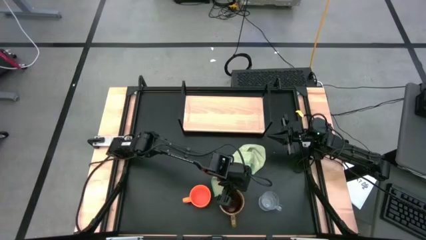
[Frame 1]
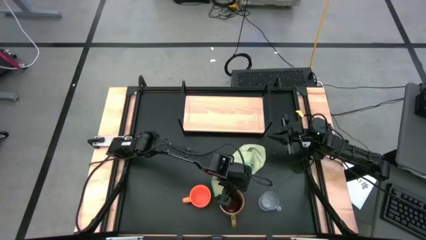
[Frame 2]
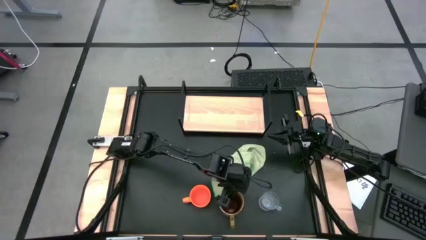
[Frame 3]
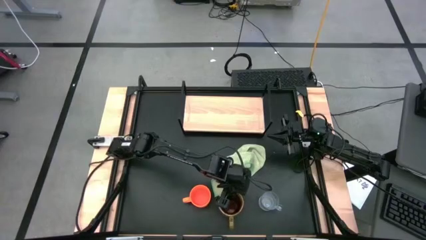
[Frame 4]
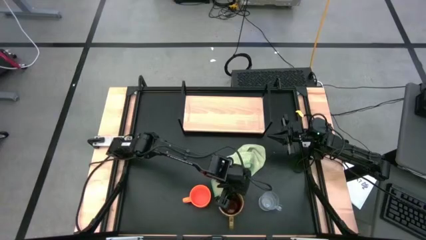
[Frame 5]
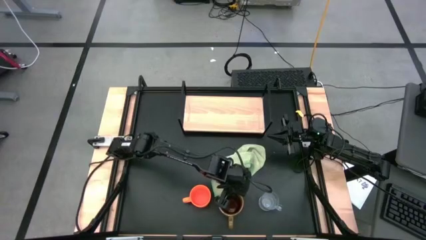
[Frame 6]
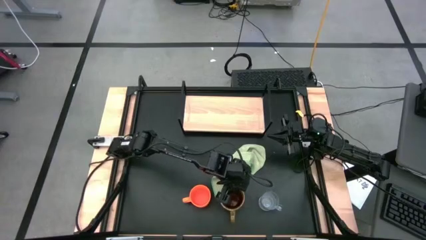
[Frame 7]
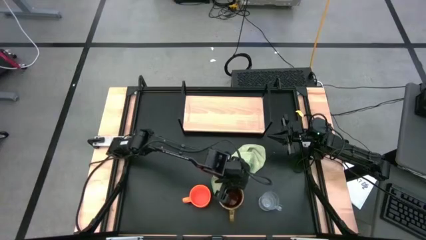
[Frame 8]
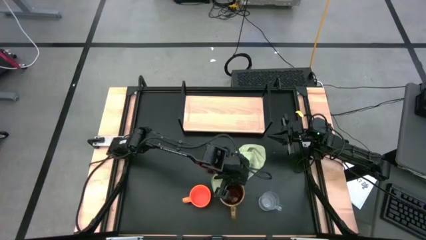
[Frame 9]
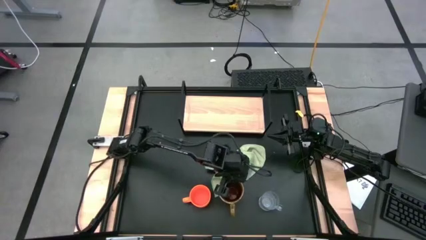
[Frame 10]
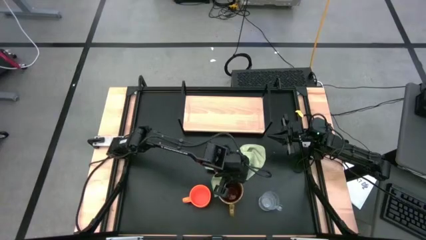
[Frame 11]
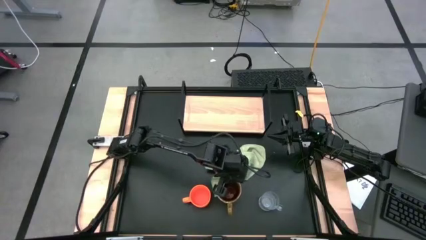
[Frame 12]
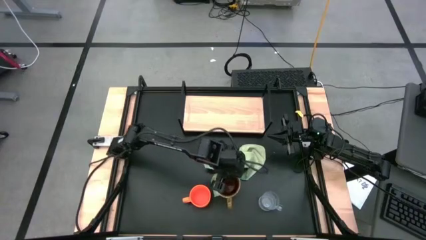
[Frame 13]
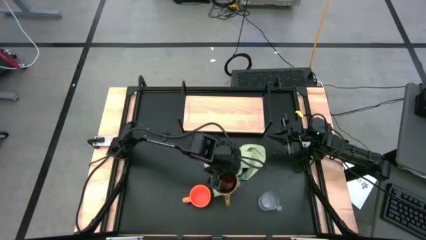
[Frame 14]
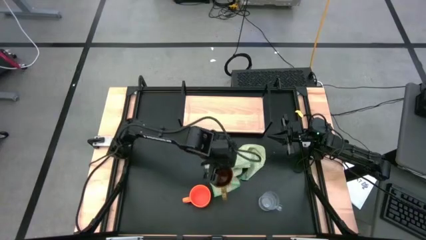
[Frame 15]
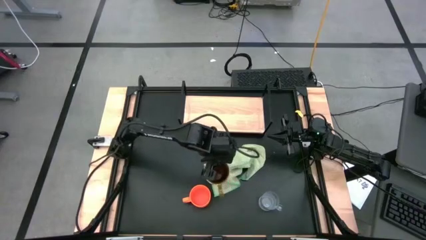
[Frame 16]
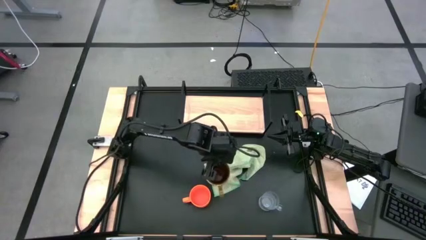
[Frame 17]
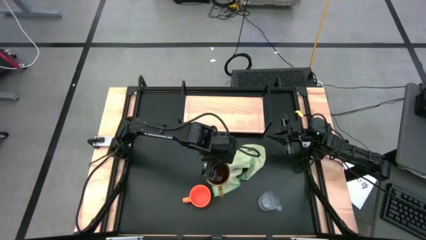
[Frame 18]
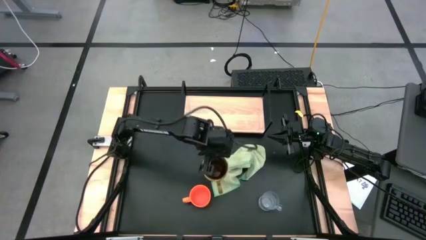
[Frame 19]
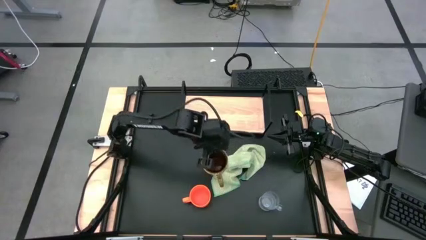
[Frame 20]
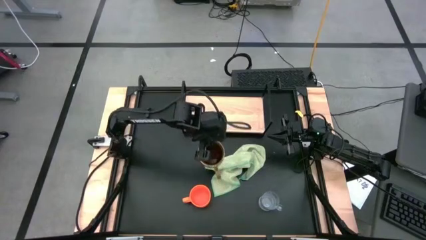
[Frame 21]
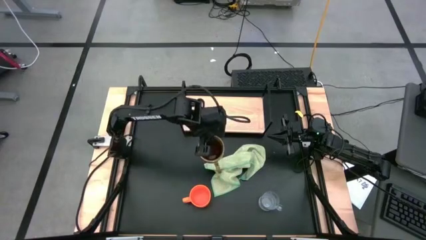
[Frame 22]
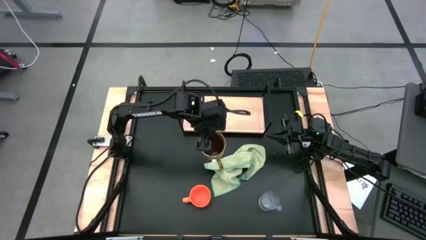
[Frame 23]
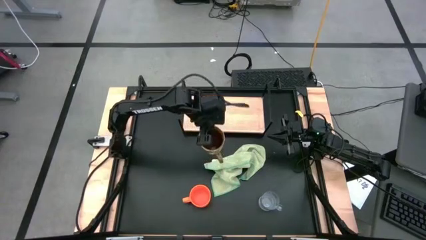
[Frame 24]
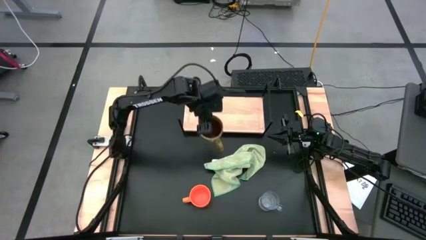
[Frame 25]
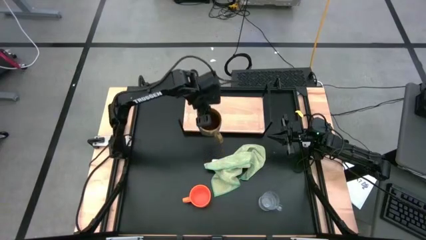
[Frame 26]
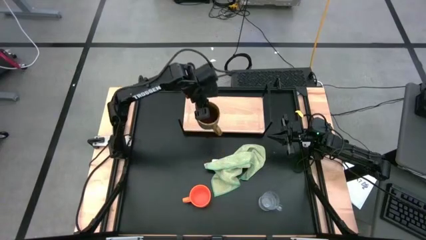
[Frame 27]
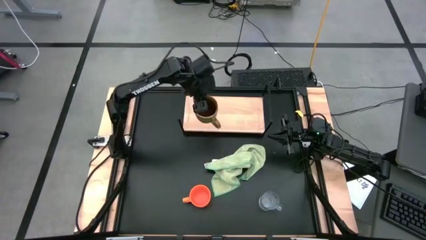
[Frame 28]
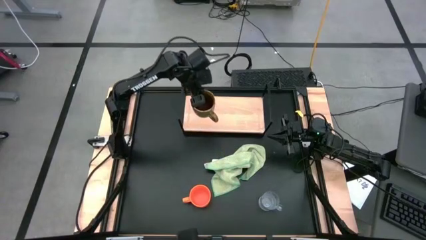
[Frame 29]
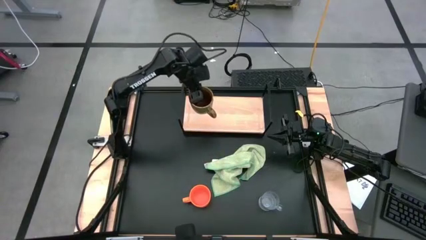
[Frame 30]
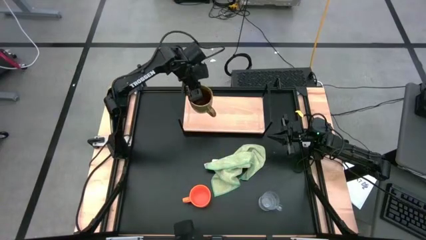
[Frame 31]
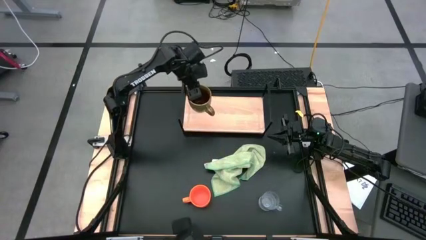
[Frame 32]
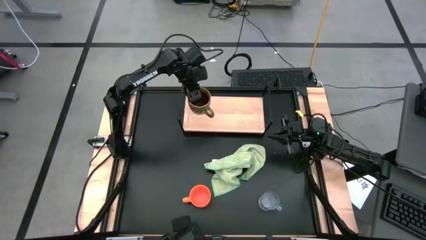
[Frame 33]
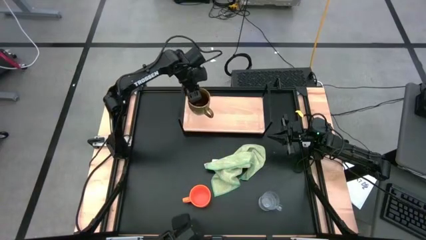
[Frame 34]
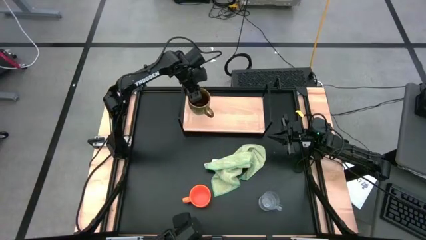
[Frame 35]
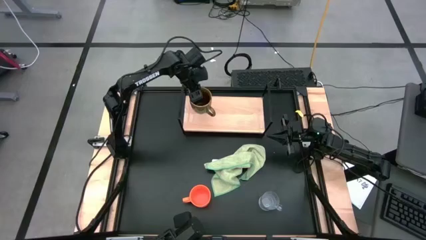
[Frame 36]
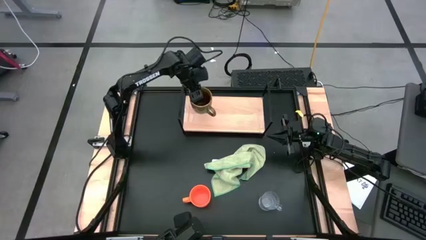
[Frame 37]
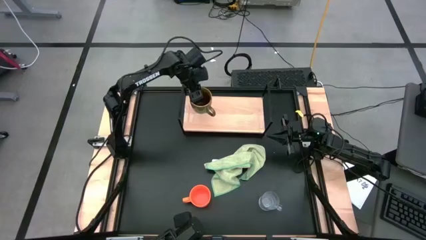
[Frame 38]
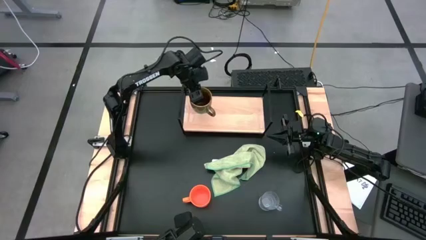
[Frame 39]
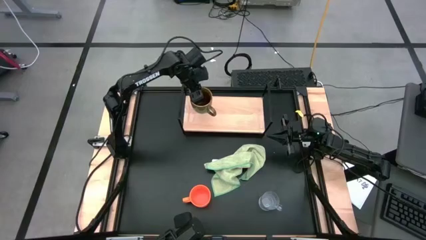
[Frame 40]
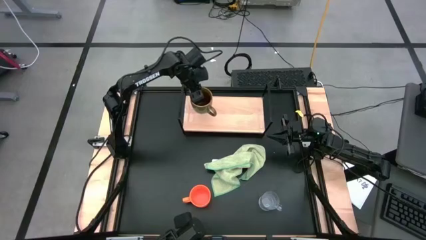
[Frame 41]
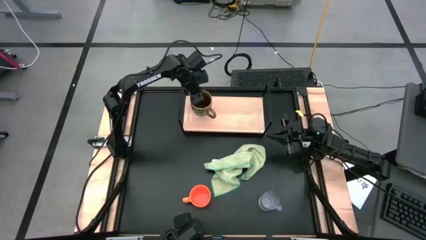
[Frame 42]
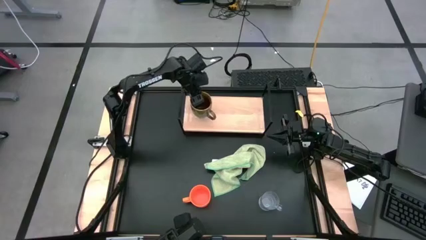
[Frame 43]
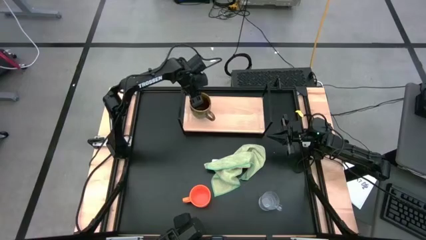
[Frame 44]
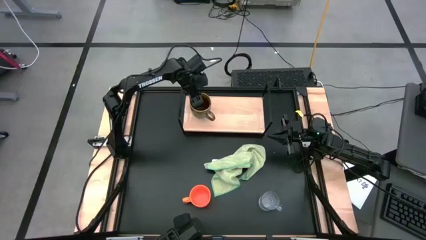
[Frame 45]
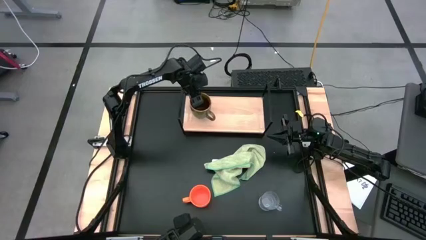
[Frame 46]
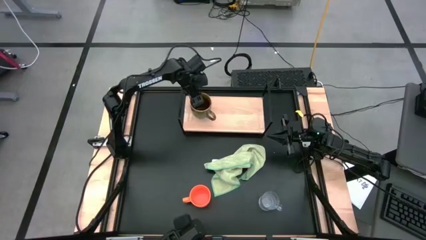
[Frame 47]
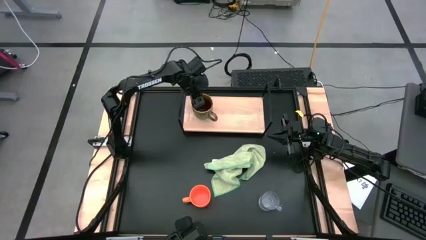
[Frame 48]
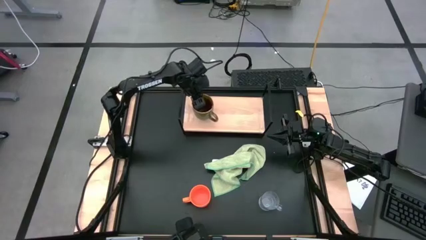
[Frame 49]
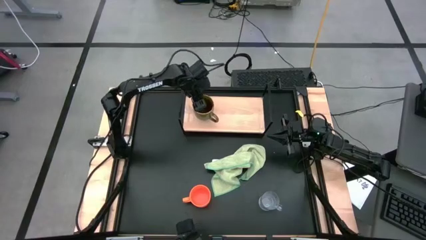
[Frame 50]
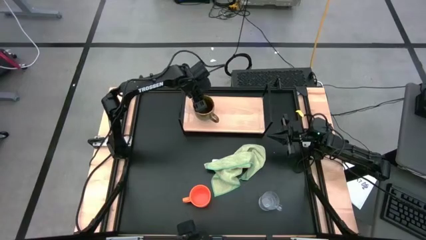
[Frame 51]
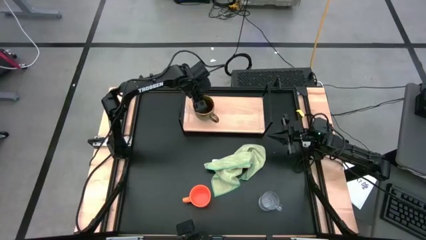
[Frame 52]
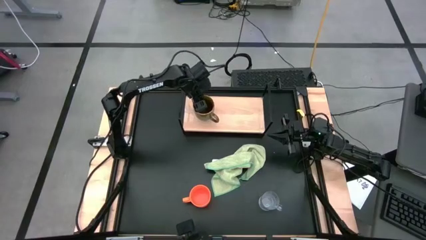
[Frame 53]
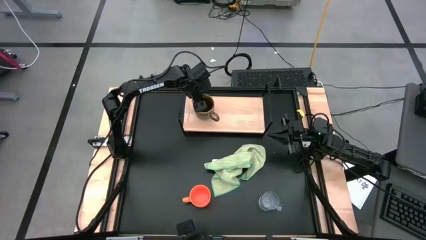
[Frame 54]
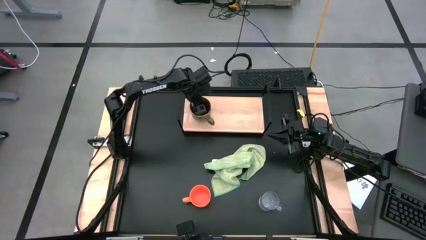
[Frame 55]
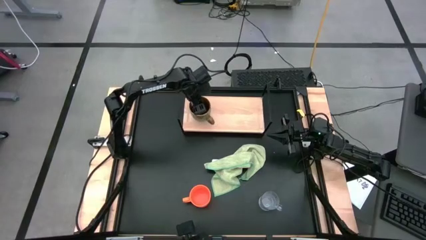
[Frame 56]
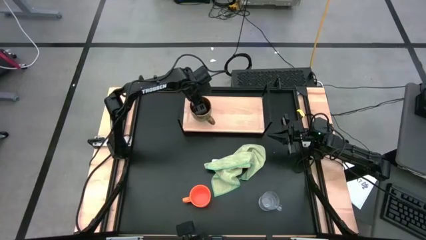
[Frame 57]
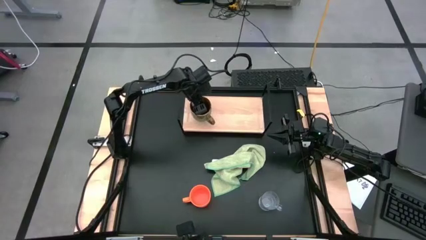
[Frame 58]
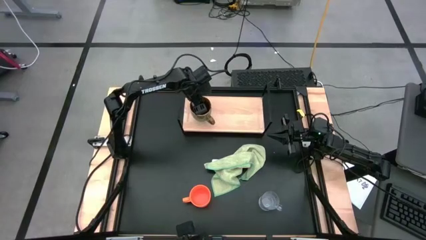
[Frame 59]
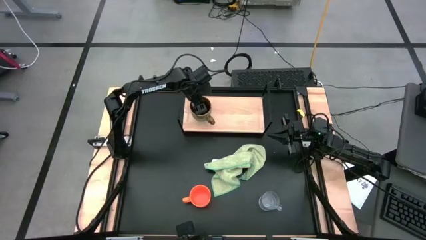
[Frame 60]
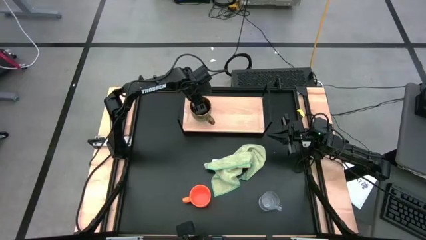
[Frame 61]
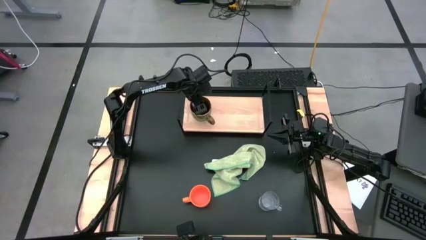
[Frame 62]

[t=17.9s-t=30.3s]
Task: Stack small to large cups/mugs on shelf
Put the green mug on the shelf
